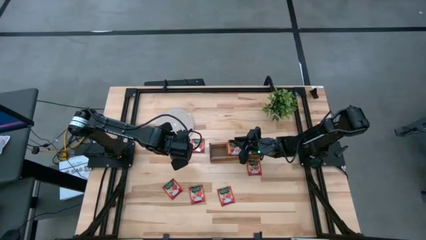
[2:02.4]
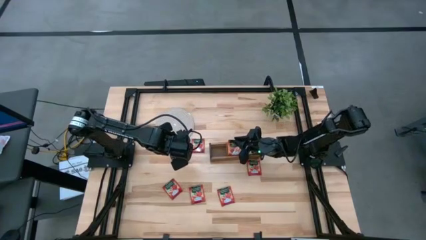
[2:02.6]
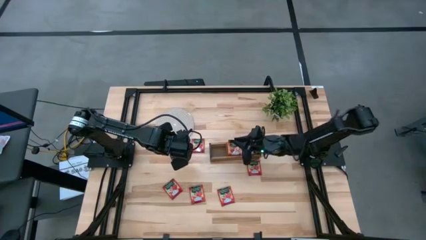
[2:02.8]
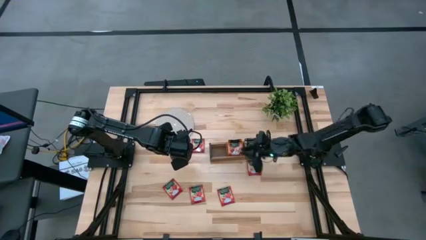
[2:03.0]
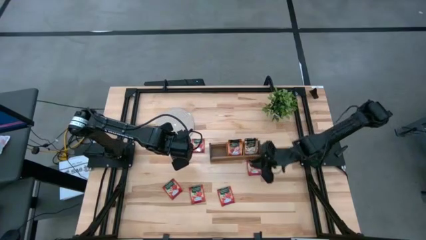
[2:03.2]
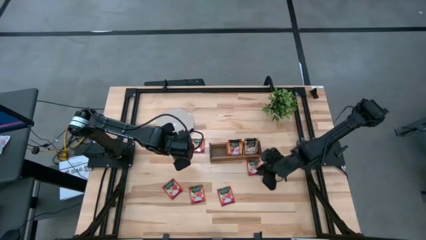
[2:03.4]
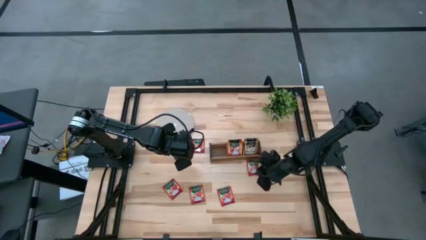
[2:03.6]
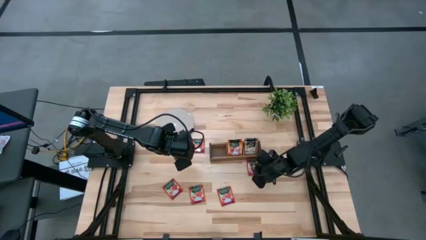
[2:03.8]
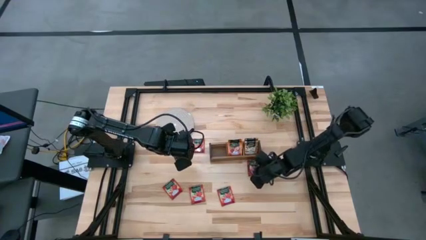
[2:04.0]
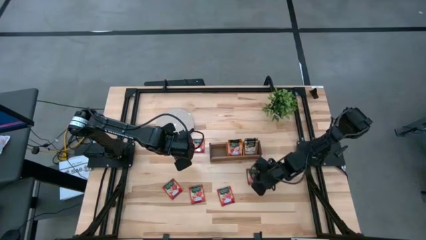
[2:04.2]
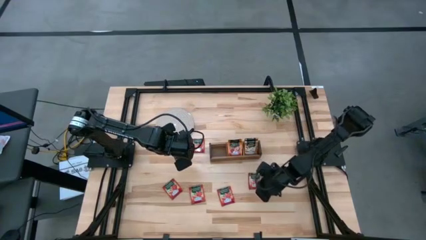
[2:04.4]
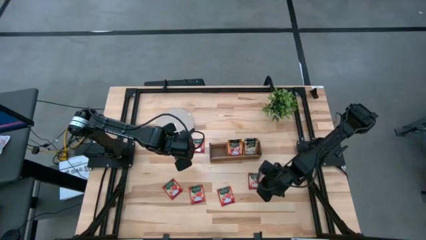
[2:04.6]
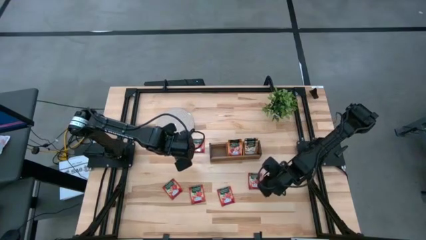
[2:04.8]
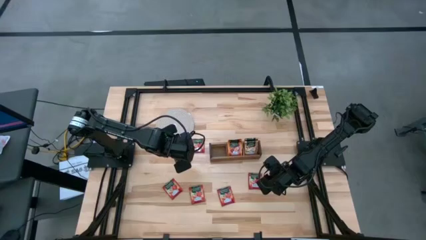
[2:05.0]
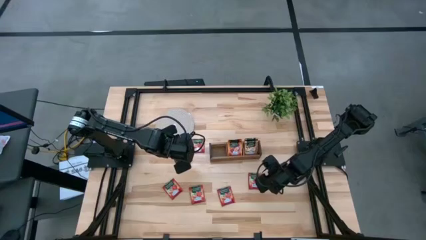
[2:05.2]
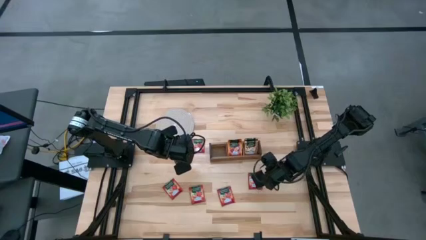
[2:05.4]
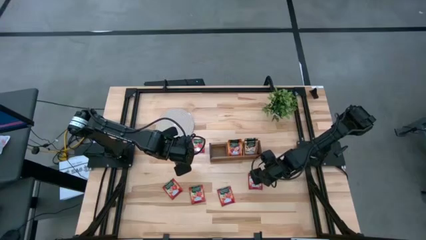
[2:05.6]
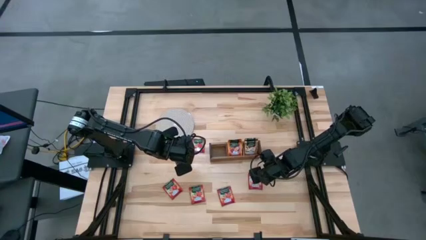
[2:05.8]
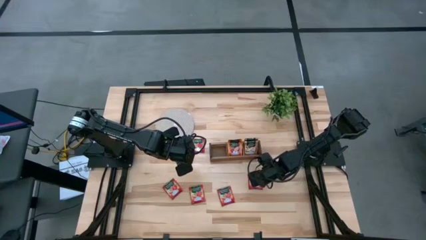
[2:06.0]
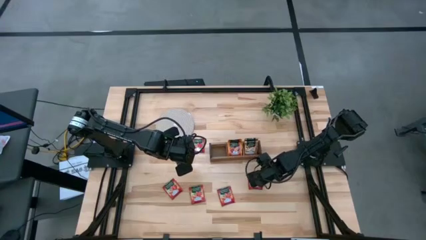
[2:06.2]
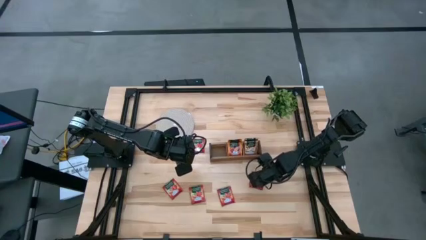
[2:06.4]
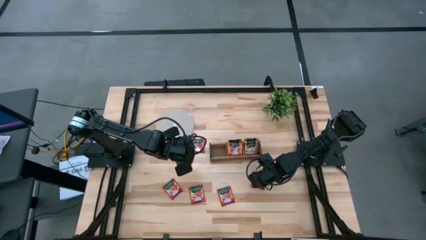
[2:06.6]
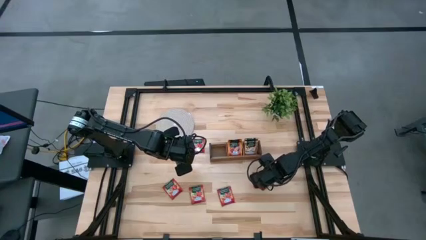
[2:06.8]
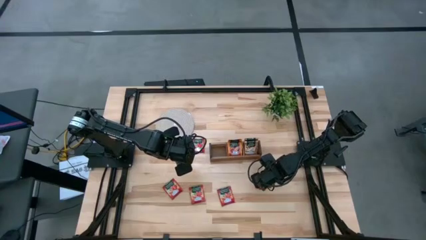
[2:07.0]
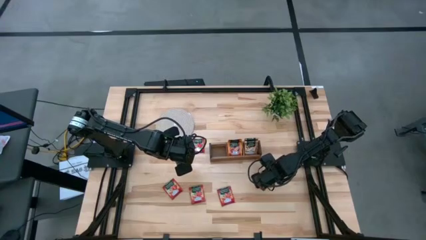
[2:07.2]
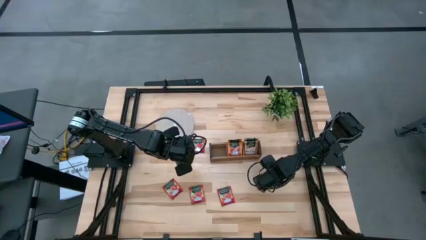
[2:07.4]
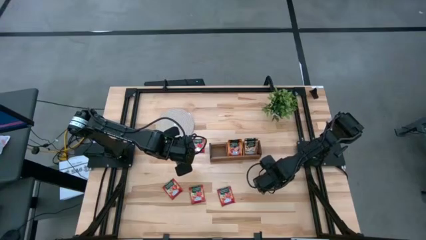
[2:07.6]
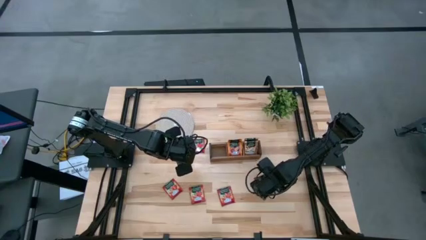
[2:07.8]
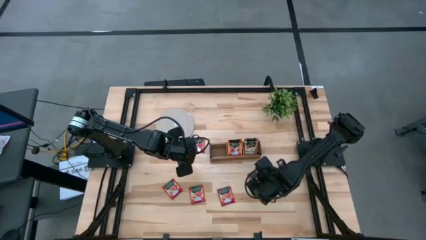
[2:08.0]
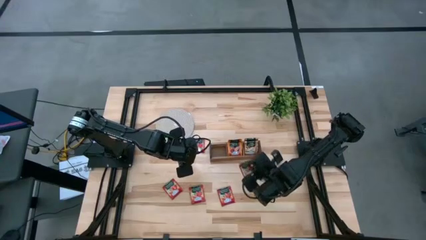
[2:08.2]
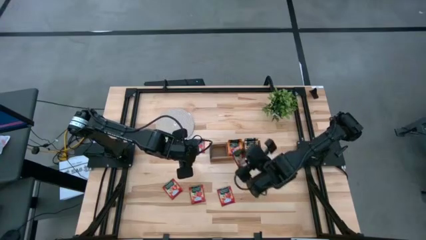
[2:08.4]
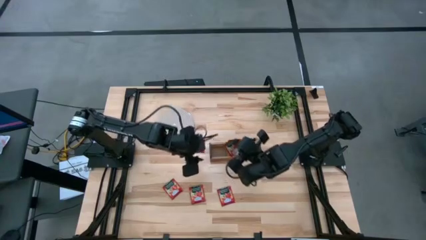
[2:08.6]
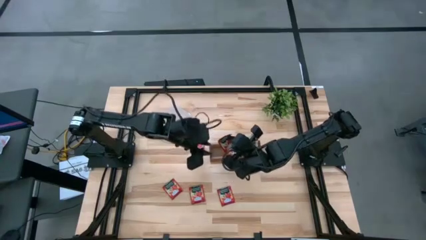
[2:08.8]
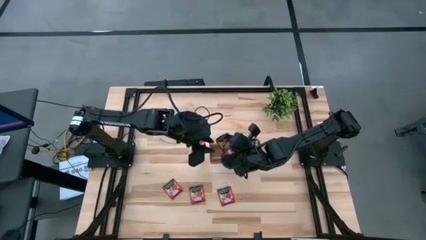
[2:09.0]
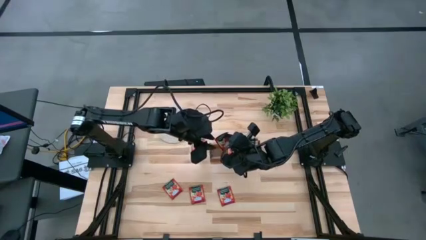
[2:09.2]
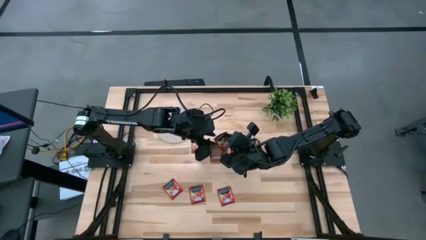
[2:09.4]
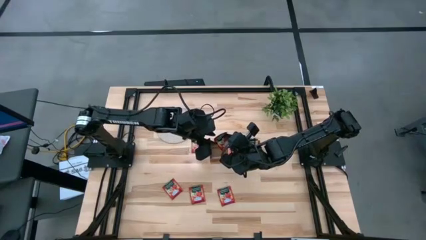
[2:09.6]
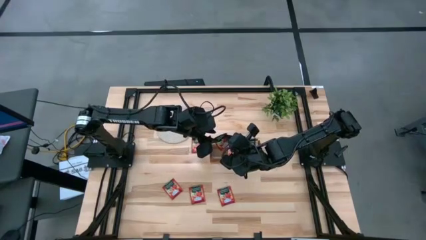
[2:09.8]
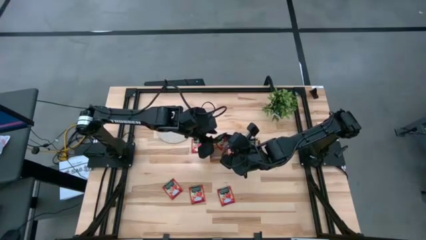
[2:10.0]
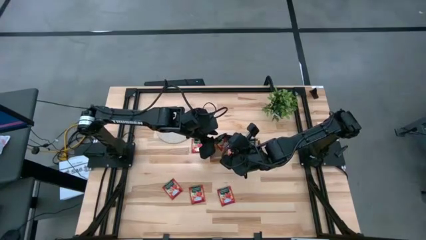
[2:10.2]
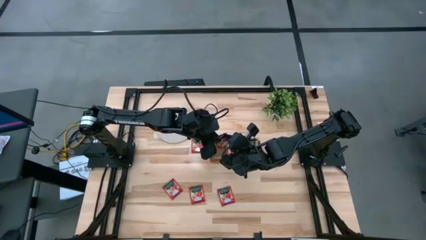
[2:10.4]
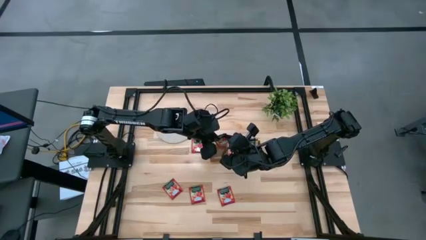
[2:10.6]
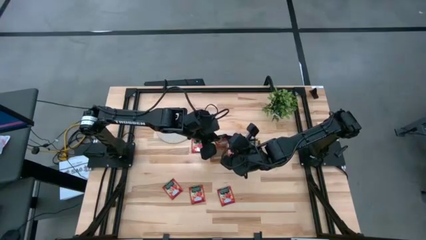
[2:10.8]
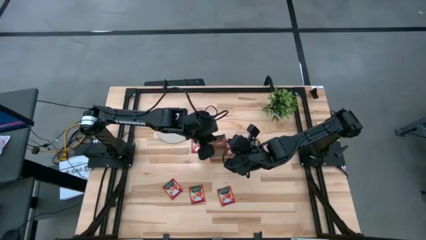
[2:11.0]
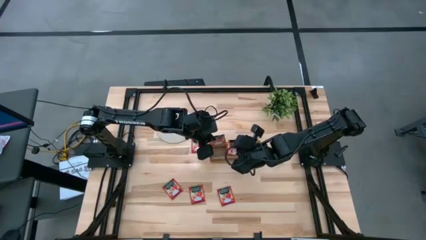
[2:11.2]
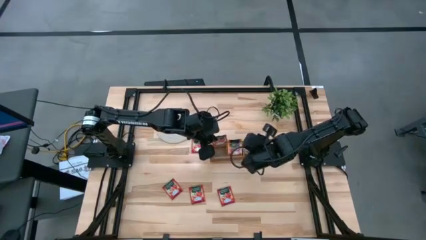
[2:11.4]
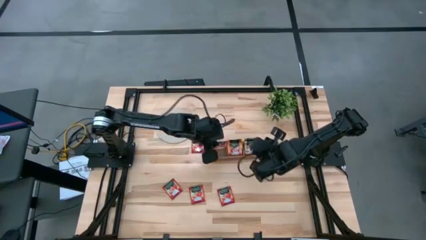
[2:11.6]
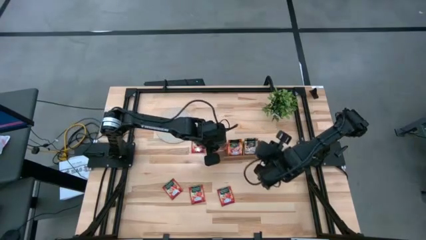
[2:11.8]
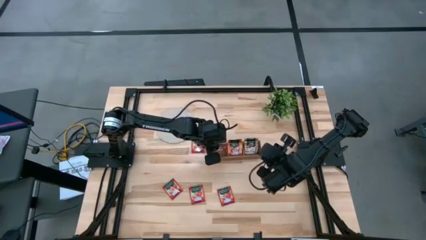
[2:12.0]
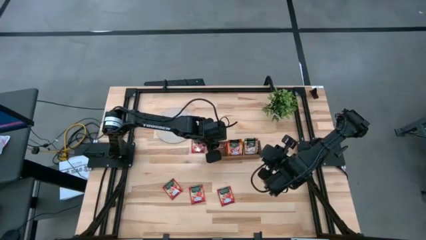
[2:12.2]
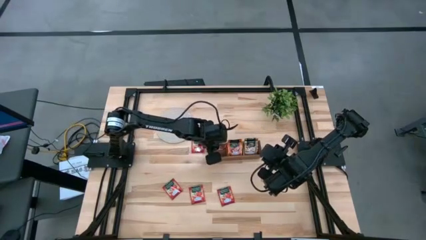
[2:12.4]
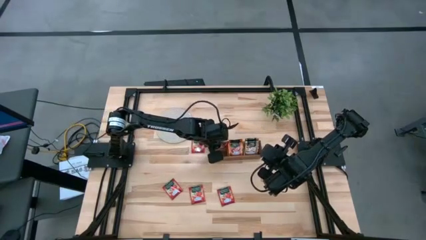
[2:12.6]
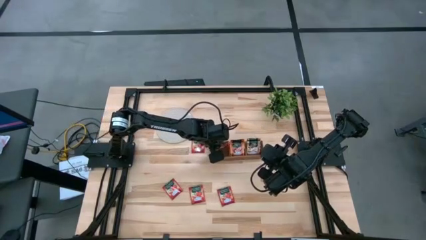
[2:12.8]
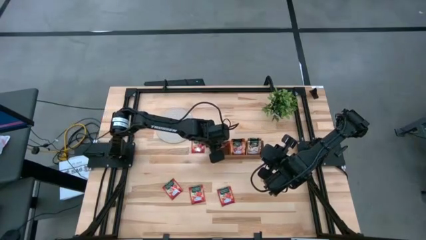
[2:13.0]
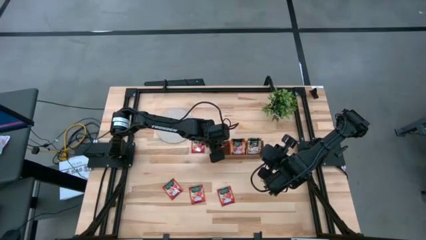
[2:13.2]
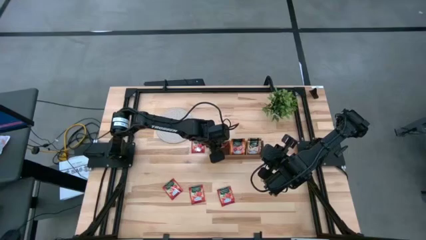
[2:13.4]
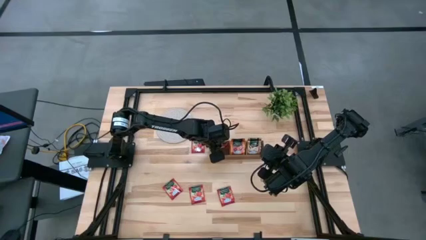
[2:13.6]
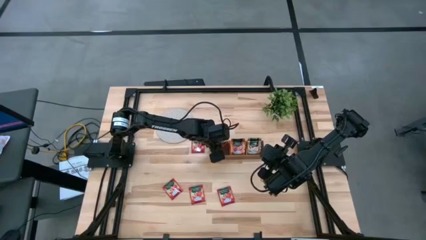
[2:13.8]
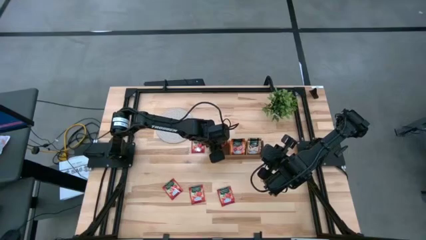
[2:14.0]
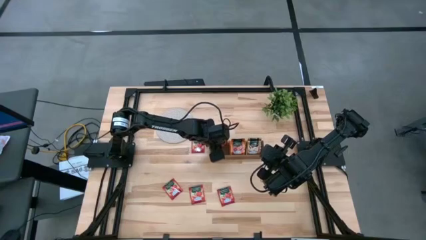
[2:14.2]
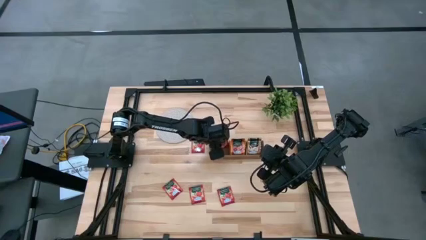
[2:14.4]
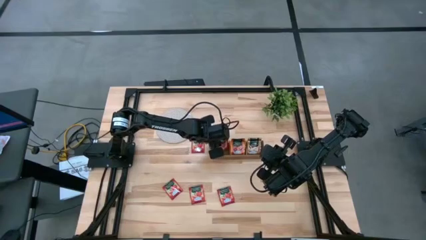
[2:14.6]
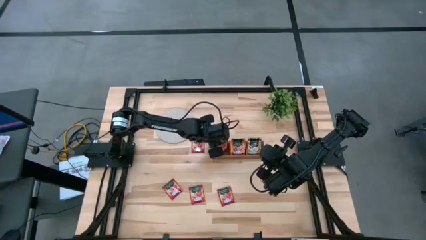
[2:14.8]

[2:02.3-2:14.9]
Task: Pick & Place Tea
Put the red tea bag into the left section of the wooden organizer

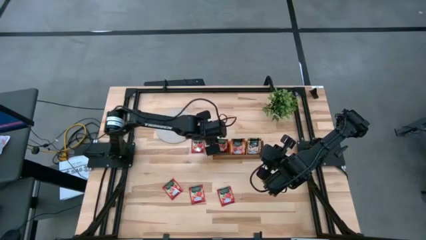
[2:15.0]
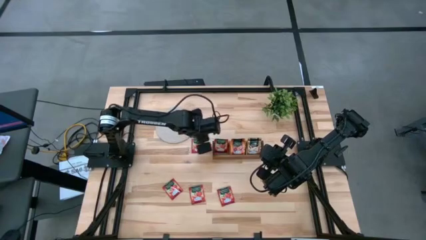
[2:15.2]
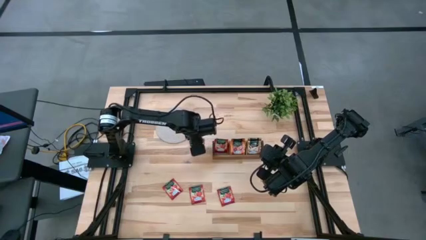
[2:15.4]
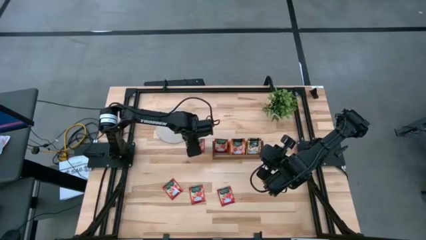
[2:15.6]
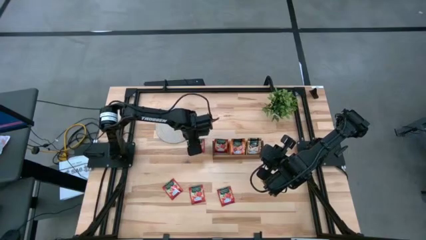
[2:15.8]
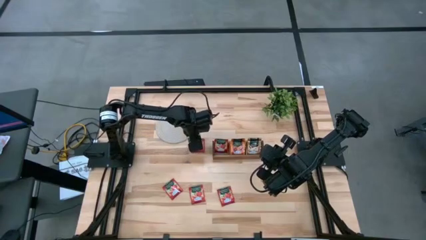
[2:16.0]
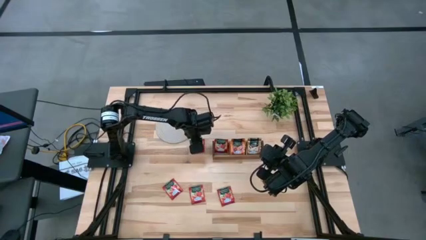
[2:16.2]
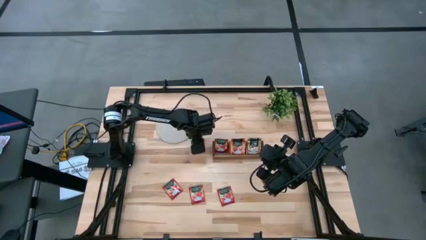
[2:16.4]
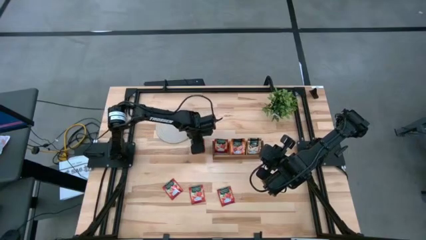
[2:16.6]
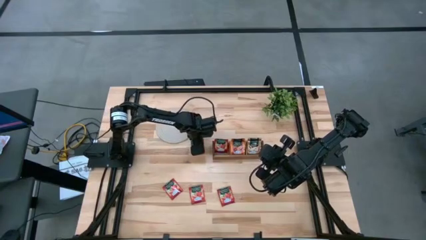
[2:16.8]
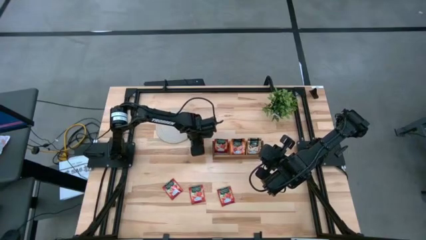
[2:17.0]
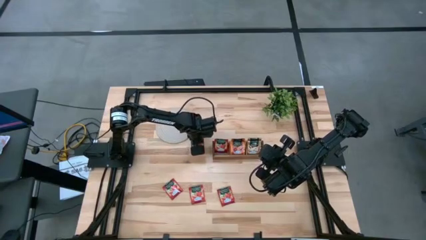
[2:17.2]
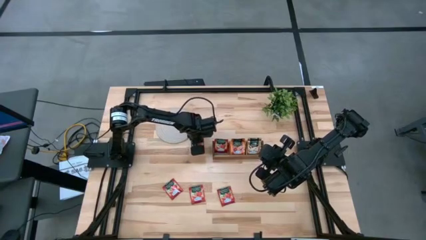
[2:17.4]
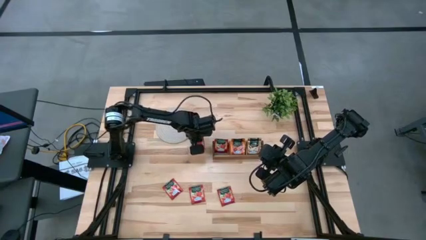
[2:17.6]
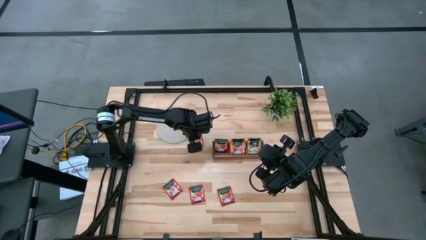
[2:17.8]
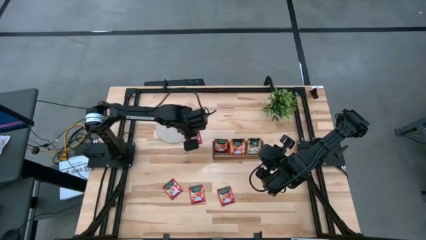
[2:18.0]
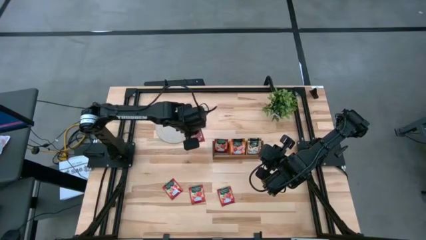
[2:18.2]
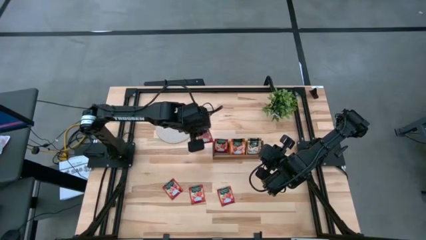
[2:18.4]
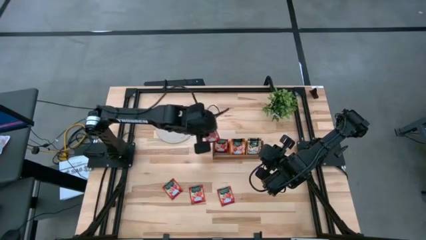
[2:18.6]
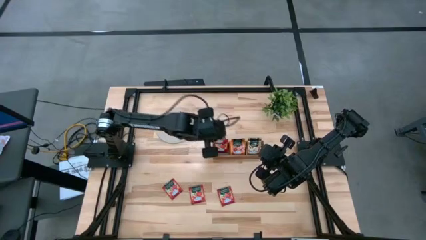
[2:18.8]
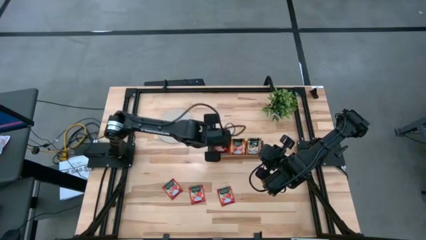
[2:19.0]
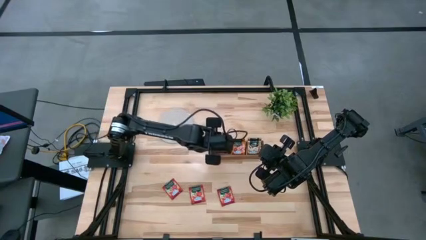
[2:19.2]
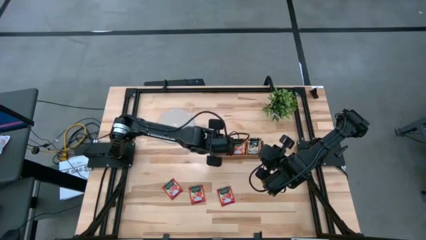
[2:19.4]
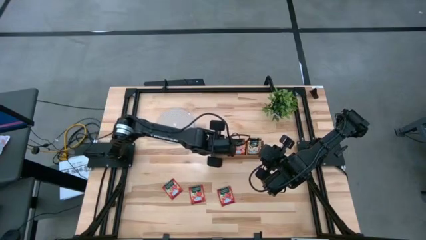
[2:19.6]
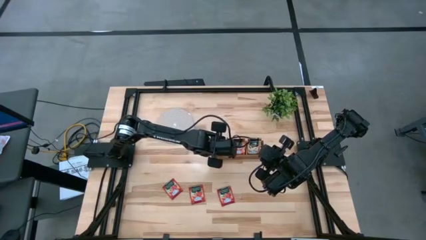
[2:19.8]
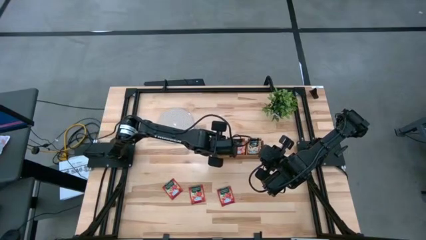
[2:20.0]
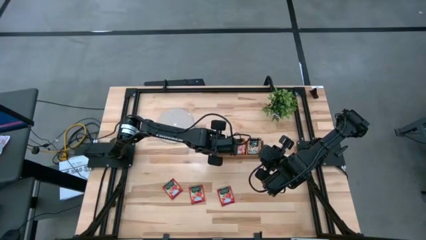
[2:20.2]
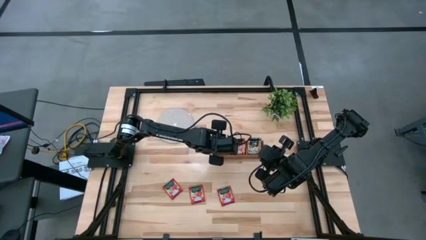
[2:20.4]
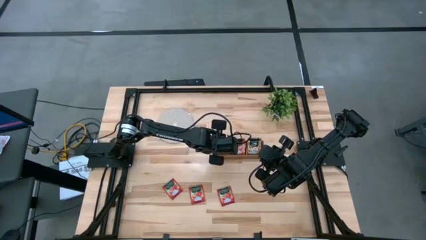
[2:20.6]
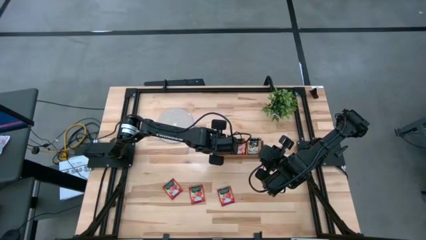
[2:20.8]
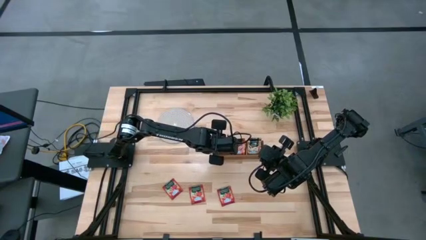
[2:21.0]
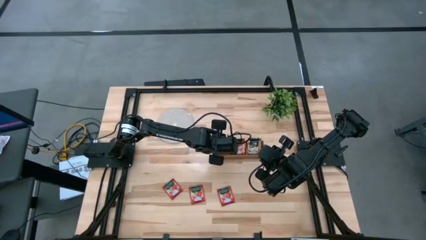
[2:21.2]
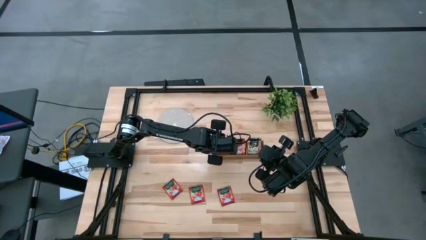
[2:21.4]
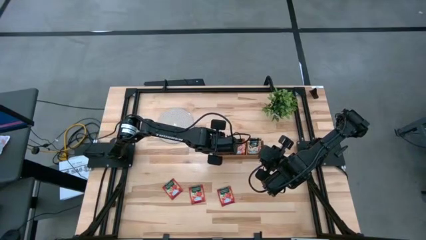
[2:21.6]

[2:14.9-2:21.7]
Put the red tea bag into the left section of the wooden organizer
